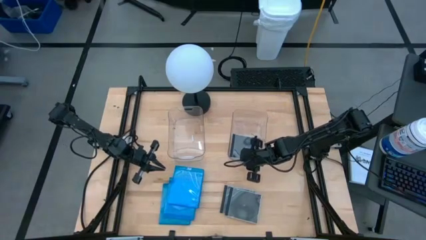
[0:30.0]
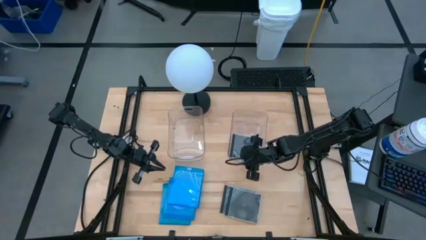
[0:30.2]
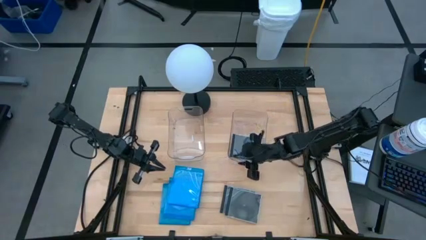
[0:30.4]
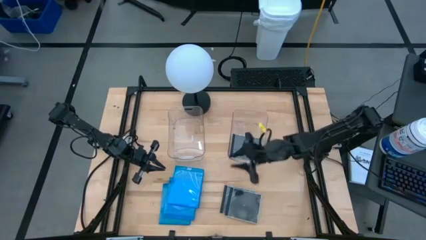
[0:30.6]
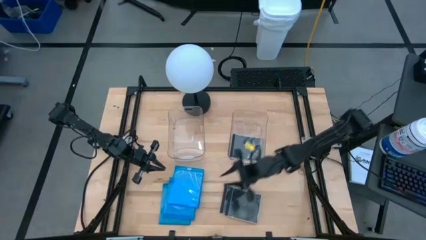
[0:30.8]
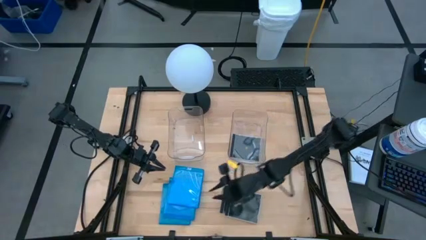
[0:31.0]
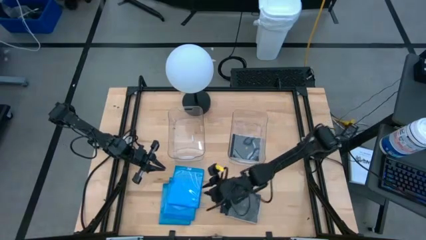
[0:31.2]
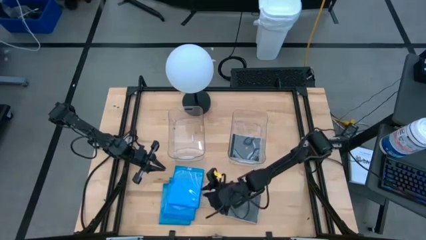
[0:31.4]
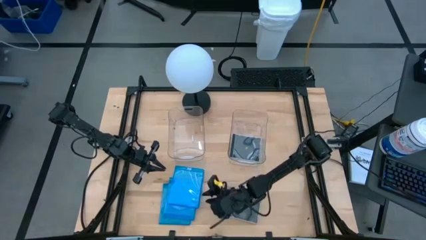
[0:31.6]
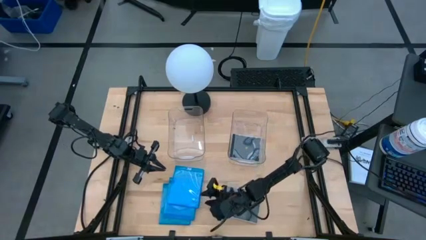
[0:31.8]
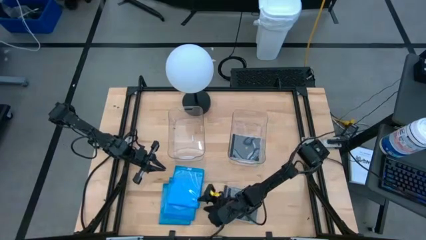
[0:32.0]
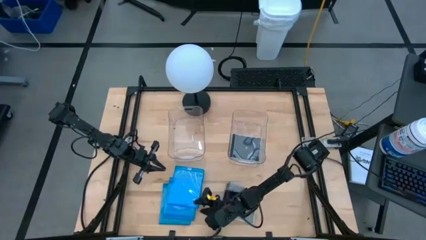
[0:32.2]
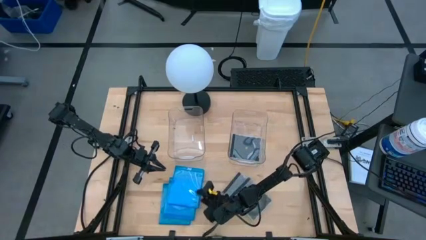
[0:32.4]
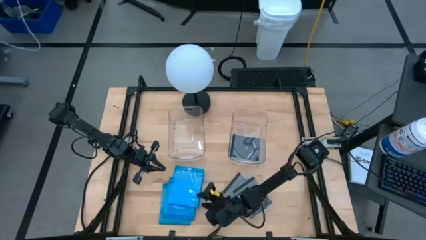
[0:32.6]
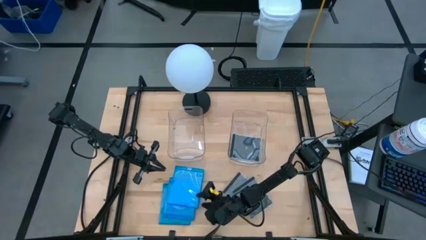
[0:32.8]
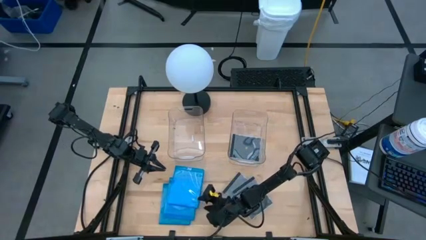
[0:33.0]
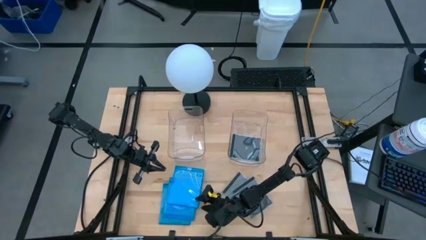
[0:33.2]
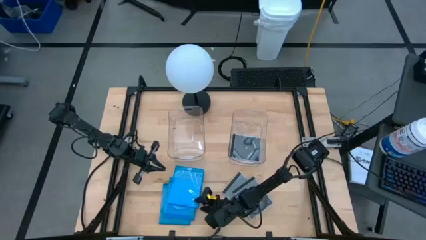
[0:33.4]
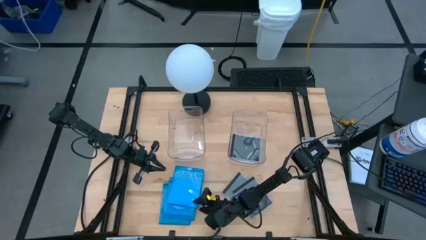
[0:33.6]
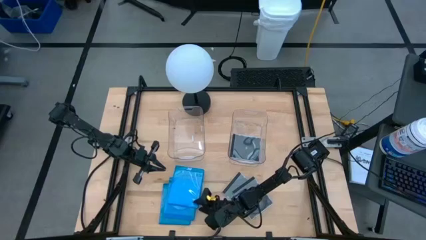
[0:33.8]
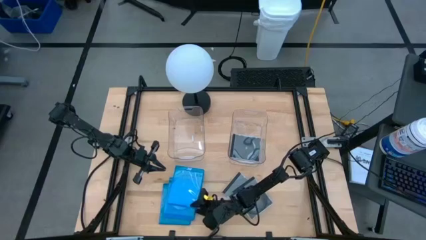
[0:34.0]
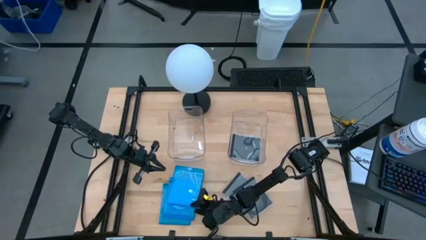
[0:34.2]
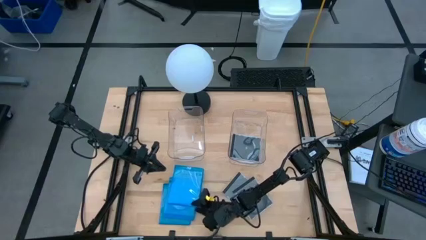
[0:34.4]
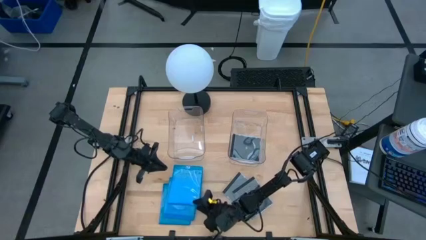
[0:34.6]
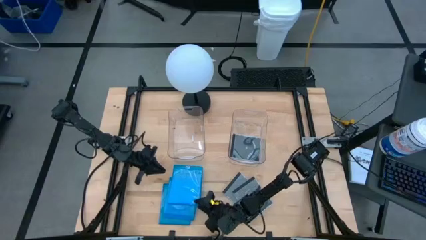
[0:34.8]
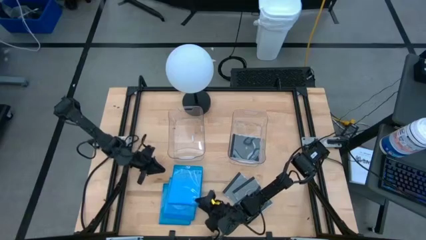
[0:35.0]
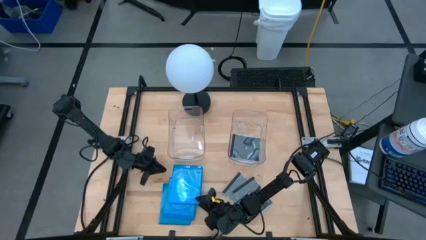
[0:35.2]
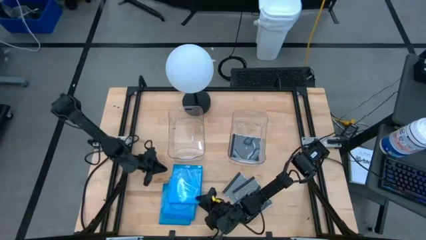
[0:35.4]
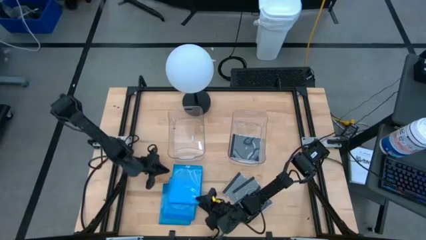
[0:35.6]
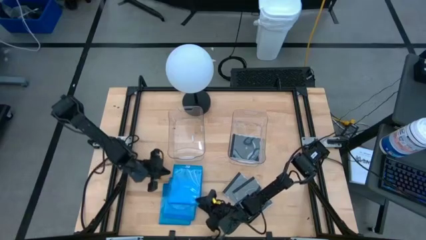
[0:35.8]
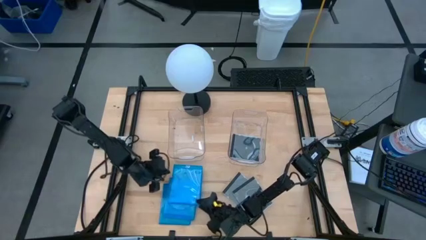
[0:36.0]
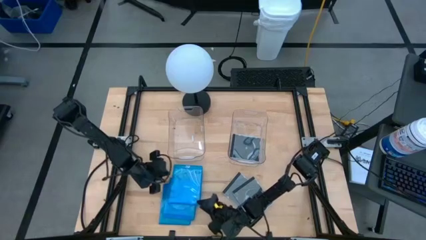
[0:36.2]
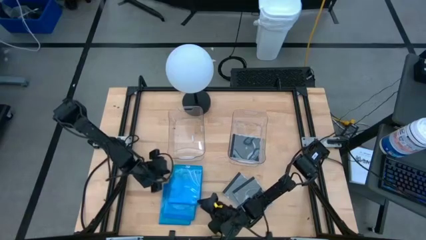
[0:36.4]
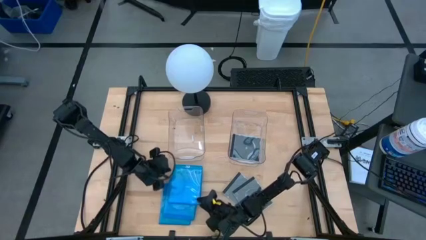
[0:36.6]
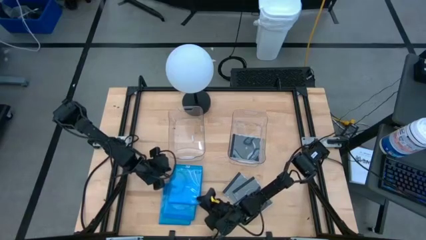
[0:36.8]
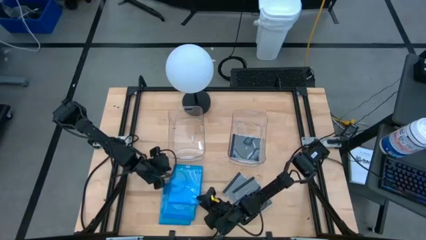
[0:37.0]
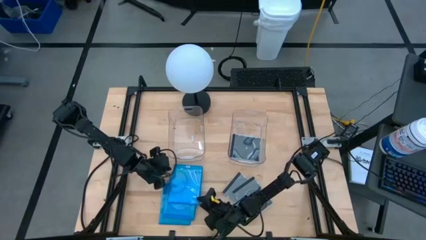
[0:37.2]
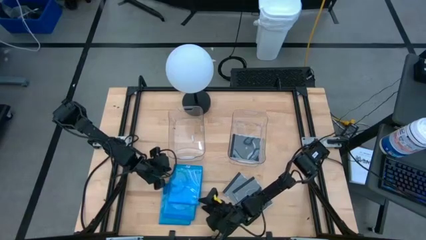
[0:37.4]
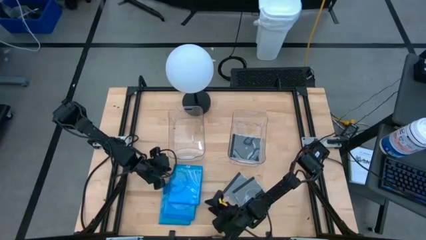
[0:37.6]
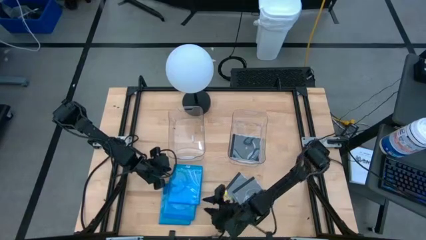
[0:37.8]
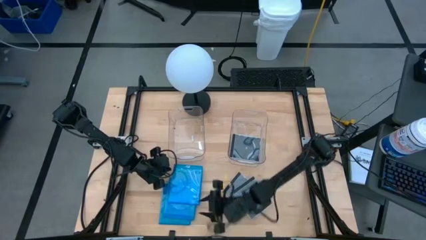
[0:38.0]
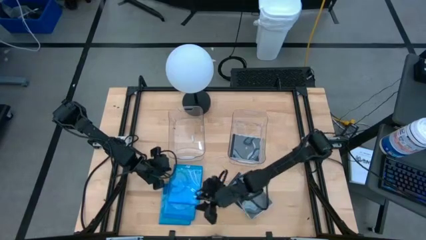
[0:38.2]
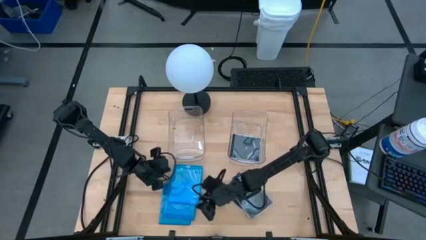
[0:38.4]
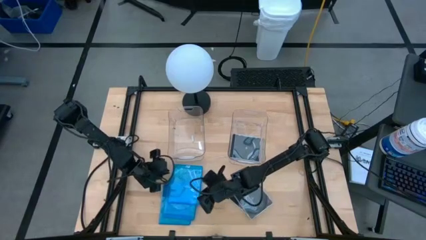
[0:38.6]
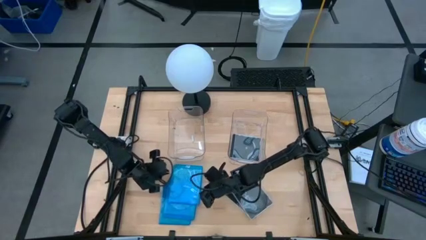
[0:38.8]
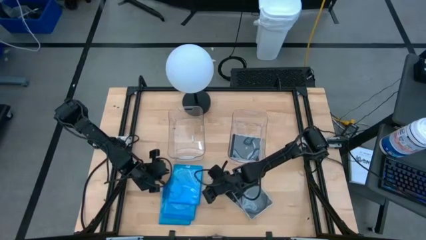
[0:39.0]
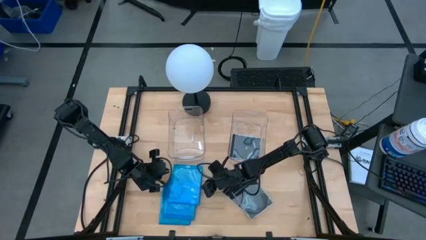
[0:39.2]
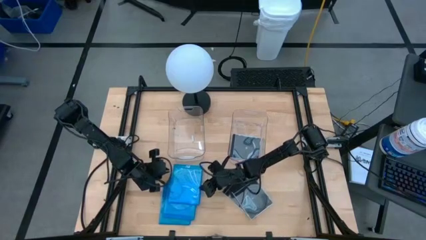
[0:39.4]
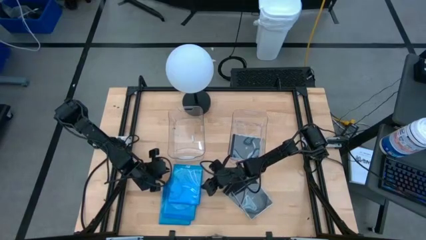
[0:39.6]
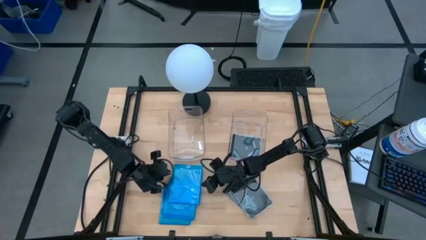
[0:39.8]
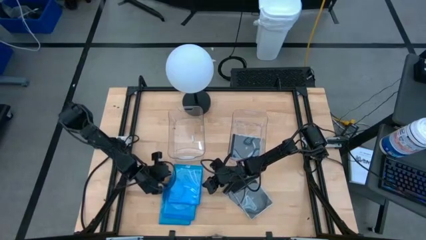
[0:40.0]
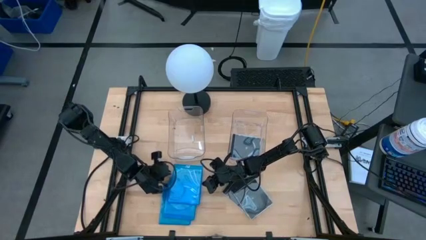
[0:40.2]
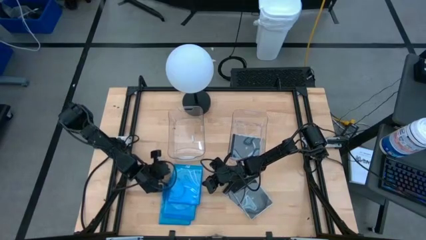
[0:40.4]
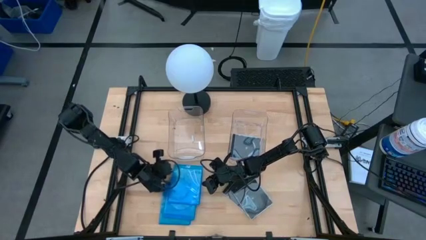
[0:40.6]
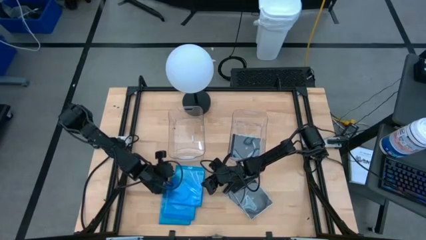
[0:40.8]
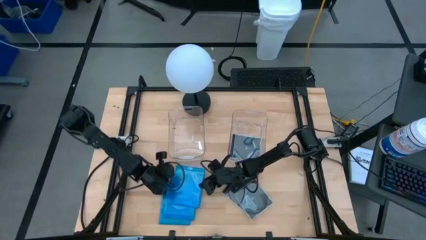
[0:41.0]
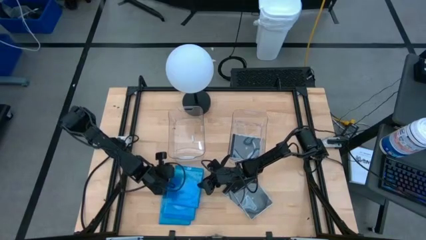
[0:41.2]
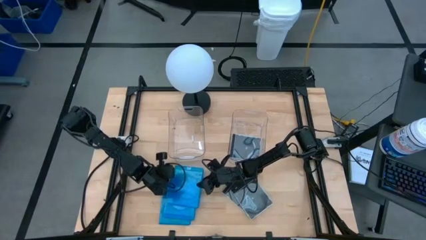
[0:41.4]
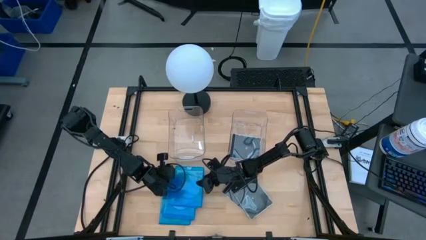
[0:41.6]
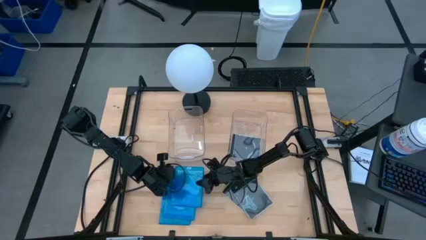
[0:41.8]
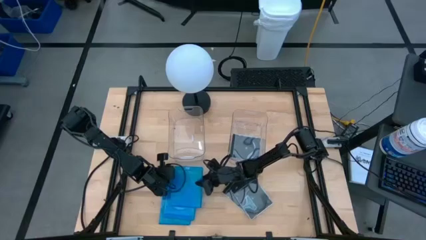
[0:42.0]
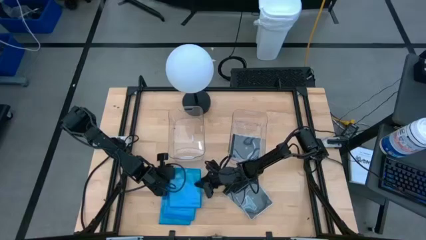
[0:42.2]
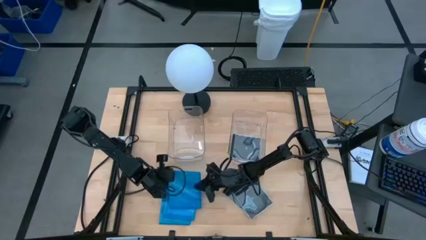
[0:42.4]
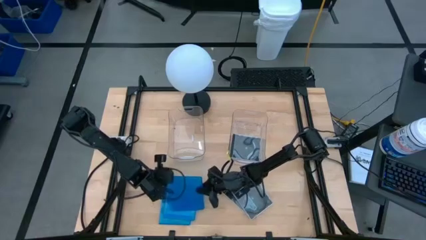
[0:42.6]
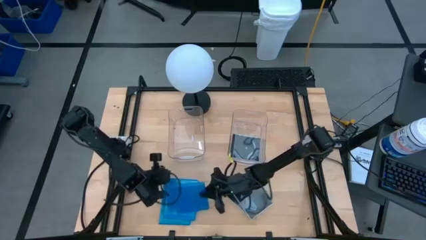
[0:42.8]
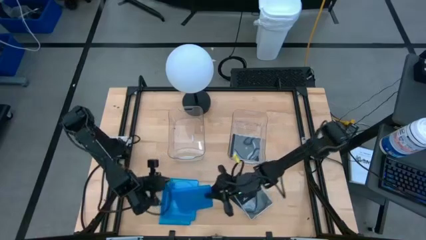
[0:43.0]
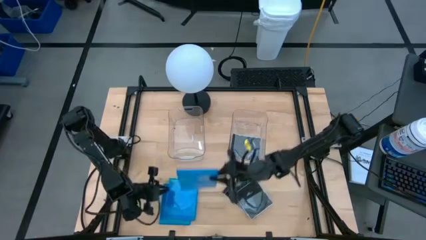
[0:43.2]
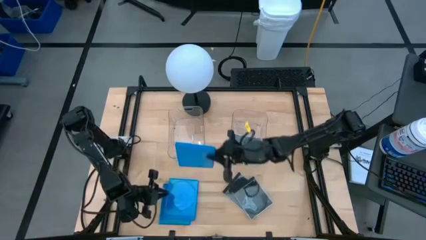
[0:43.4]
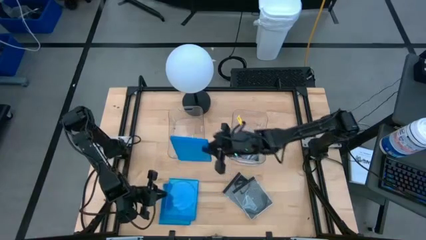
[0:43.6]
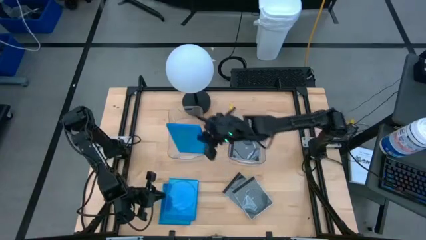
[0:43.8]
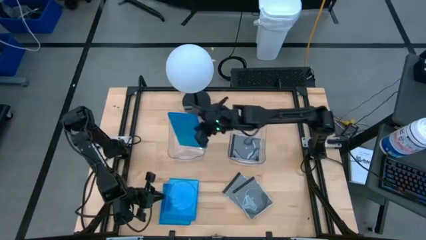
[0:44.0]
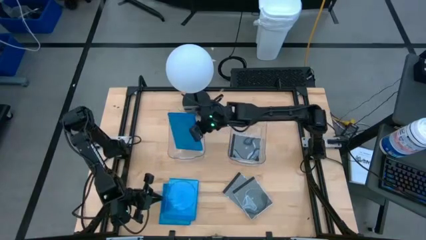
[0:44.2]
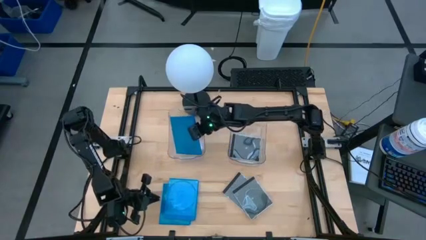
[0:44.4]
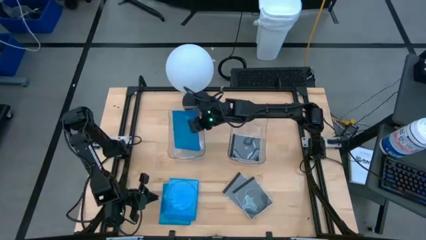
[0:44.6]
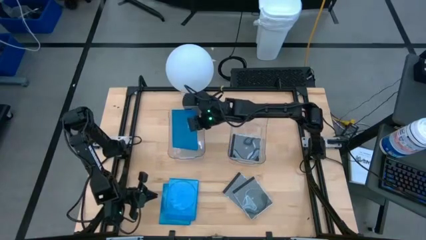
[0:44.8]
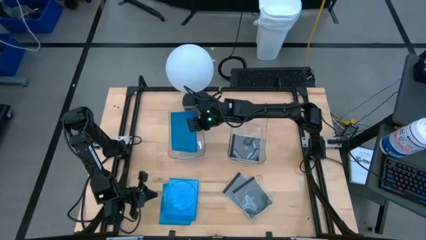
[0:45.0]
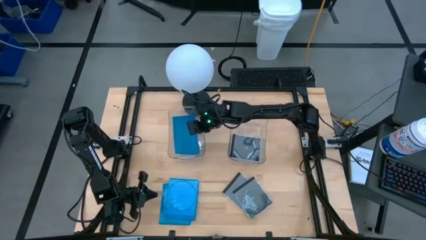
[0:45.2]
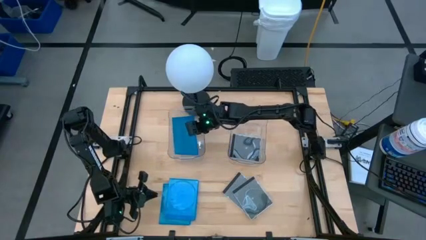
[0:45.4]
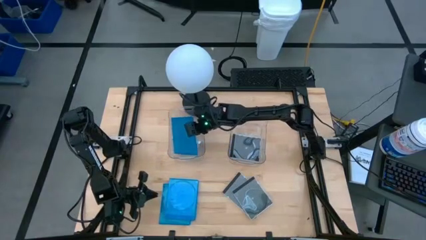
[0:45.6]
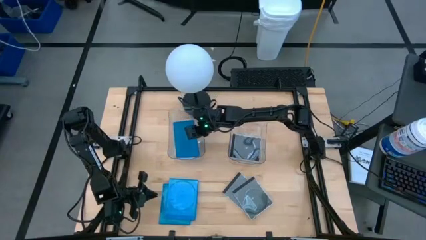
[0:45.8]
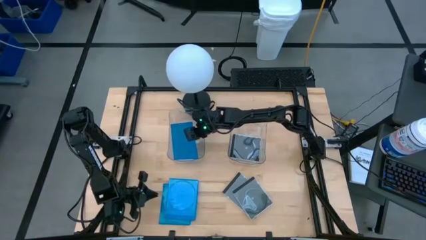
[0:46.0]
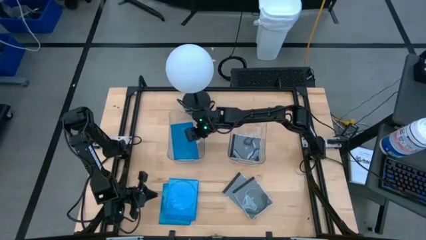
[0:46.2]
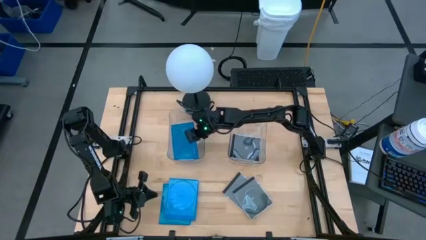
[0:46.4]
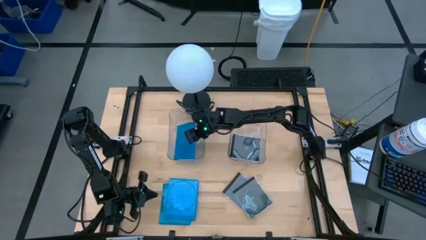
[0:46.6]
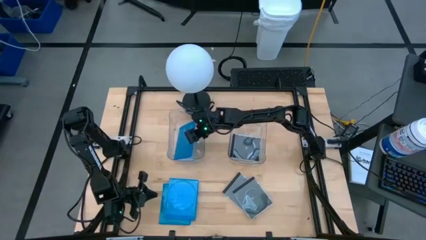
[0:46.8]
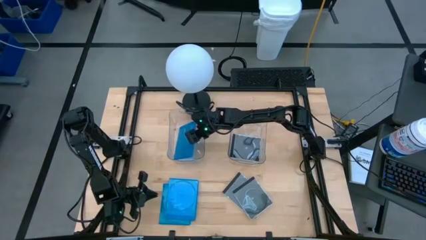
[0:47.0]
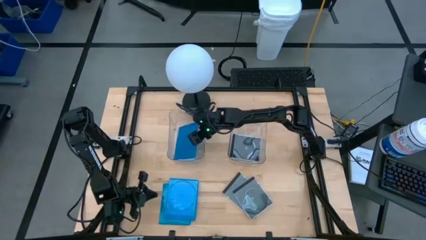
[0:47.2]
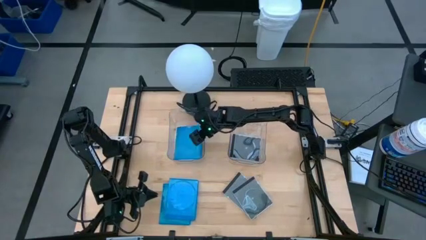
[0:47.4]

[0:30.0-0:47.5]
Task: Pick & place jewel cases by type
Put the blue CD case into the left transparent bin
